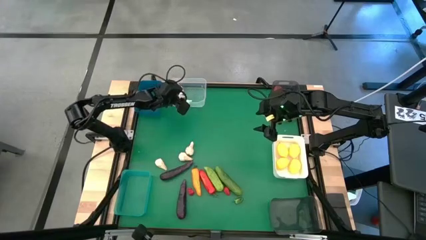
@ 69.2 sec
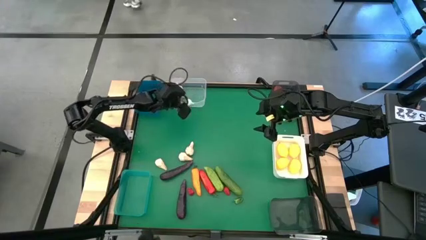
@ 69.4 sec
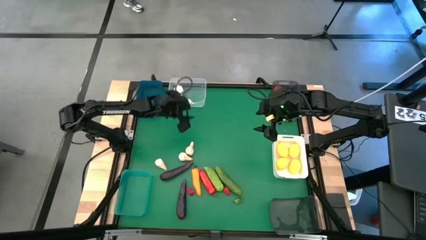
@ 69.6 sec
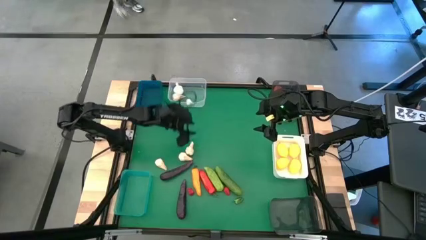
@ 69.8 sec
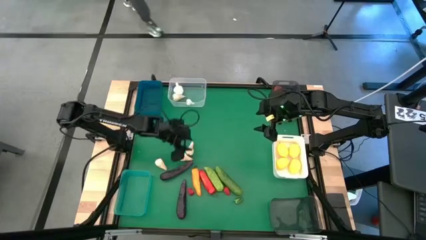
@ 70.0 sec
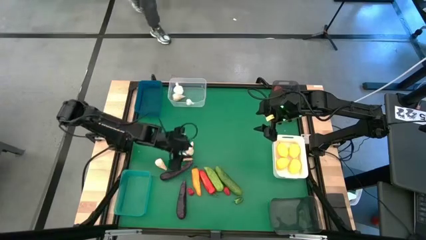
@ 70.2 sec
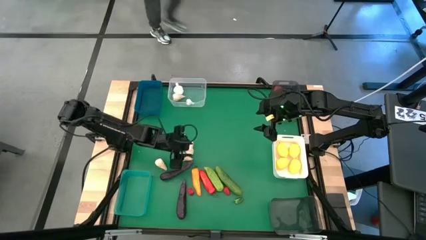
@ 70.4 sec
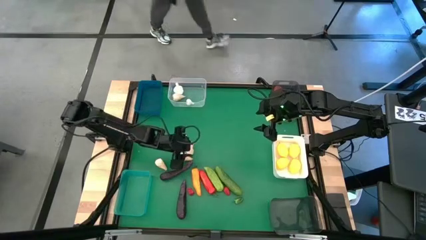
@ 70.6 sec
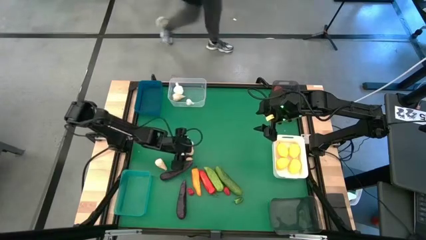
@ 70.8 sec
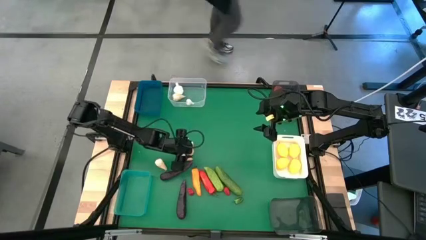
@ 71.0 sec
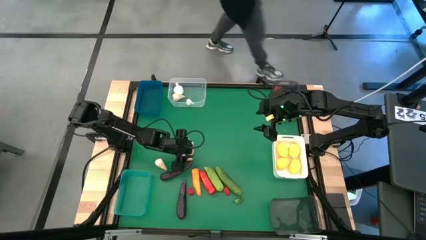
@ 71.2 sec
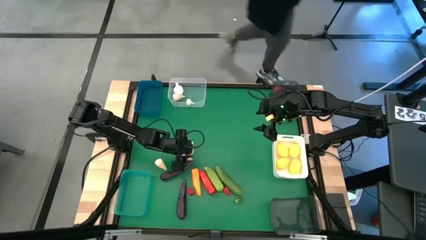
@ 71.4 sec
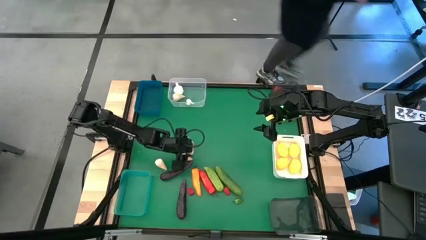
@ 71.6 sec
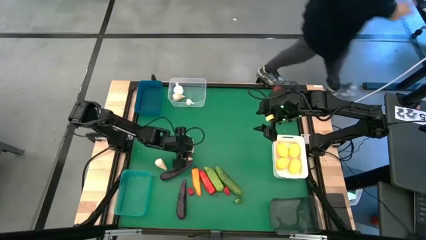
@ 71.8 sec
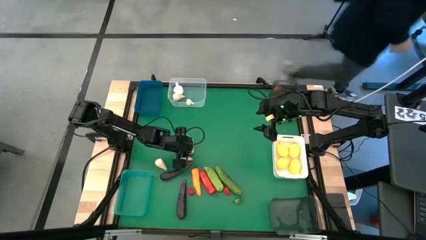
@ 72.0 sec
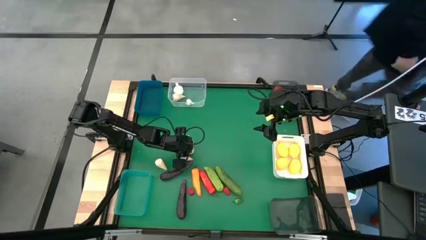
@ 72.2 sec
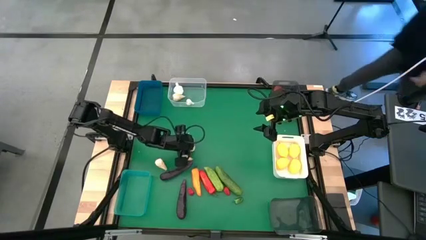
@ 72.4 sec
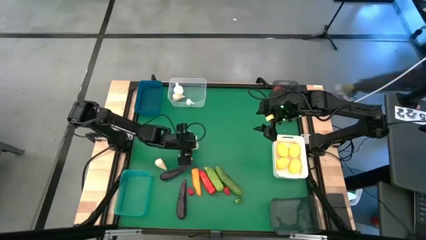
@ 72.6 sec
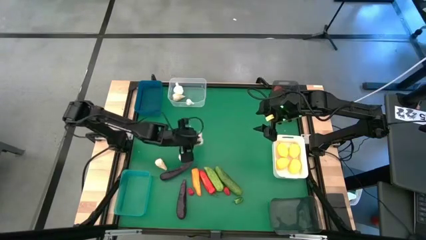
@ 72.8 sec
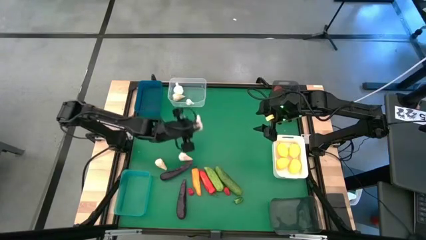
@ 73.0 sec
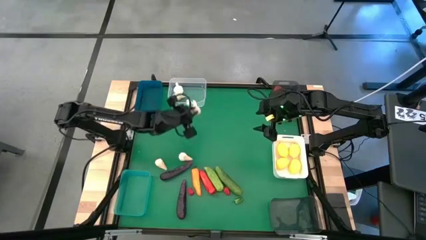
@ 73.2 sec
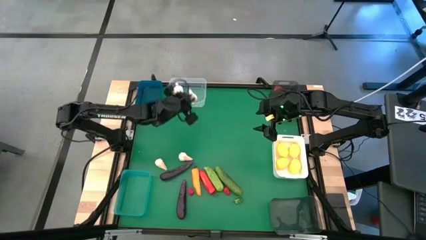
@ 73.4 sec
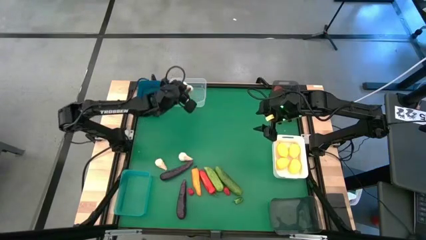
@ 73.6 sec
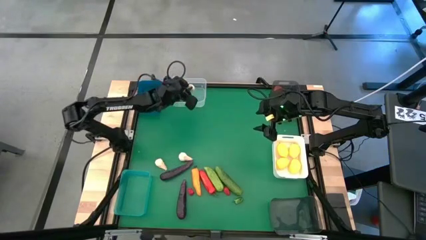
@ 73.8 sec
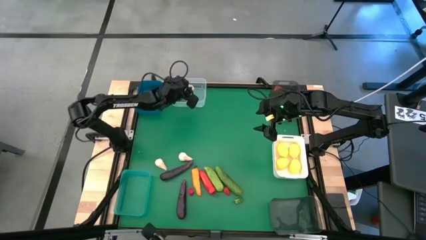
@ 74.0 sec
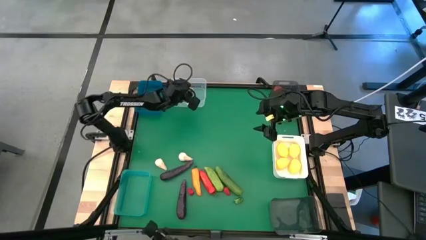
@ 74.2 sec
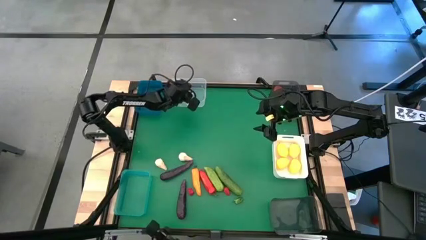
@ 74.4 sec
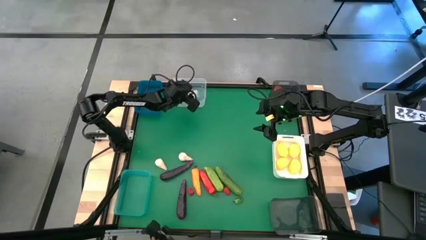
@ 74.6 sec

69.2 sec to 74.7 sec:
Task: Sort produce into baskets
Put the white garlic into the transparent bin

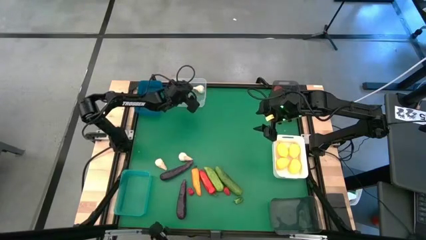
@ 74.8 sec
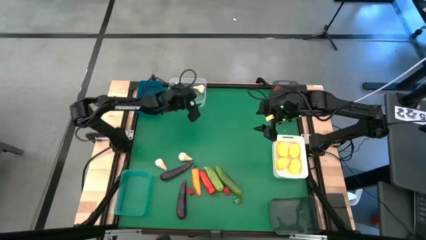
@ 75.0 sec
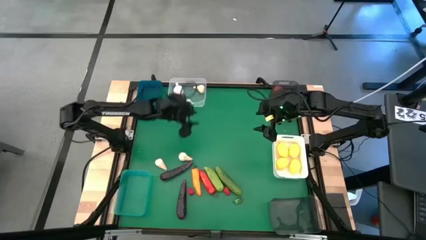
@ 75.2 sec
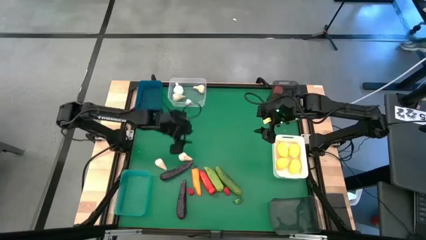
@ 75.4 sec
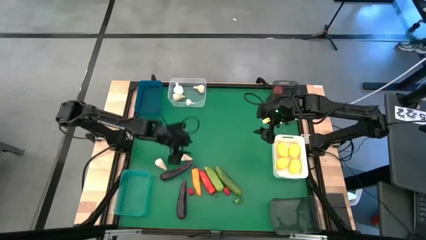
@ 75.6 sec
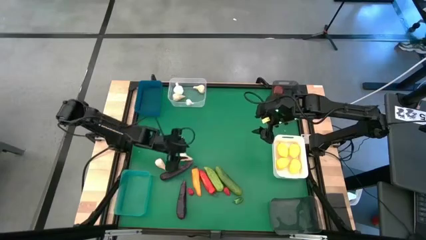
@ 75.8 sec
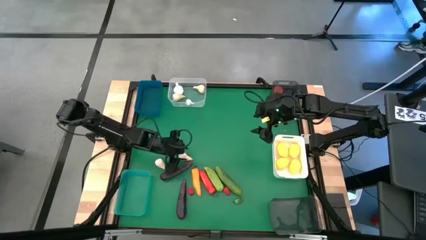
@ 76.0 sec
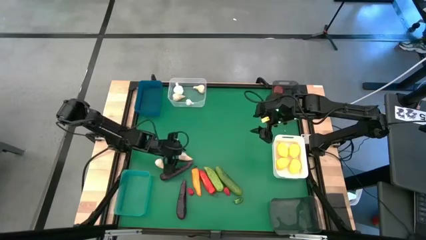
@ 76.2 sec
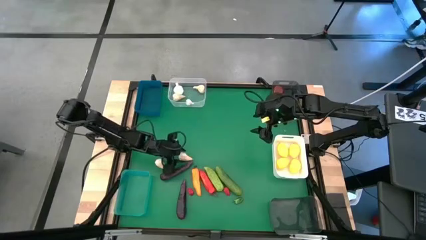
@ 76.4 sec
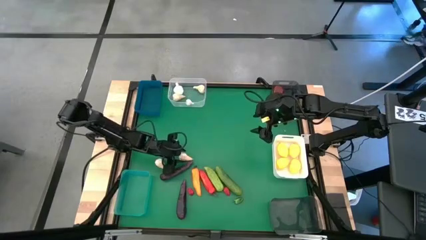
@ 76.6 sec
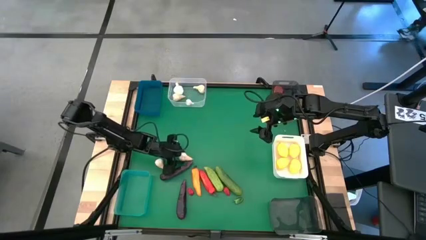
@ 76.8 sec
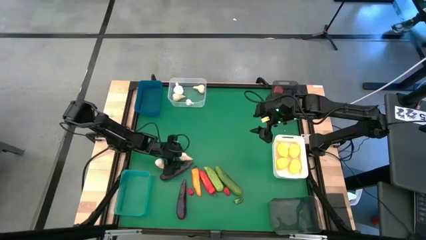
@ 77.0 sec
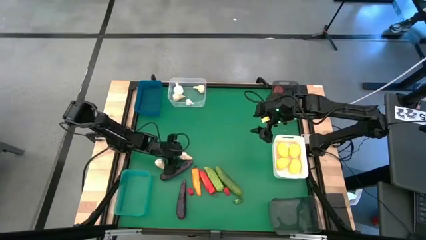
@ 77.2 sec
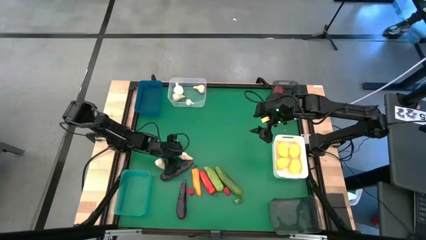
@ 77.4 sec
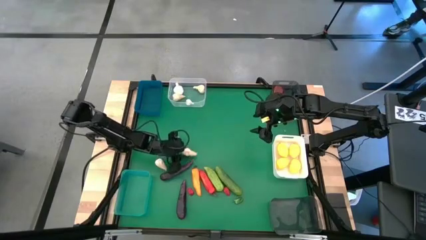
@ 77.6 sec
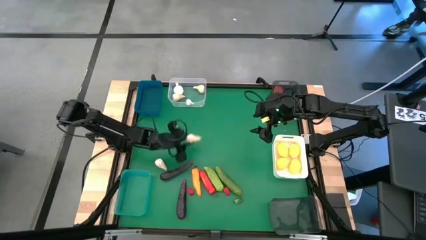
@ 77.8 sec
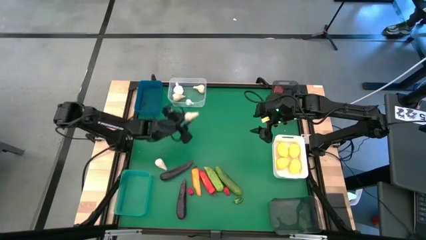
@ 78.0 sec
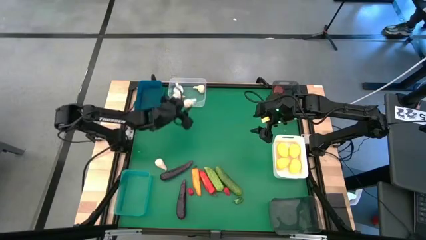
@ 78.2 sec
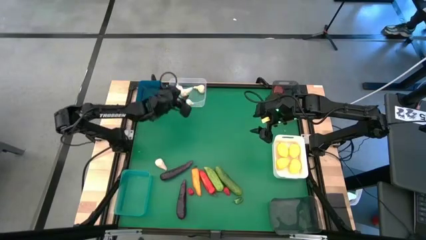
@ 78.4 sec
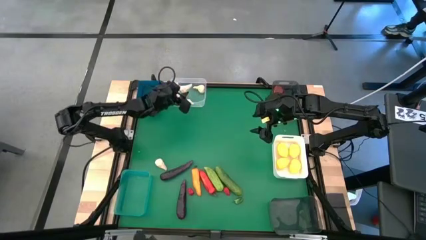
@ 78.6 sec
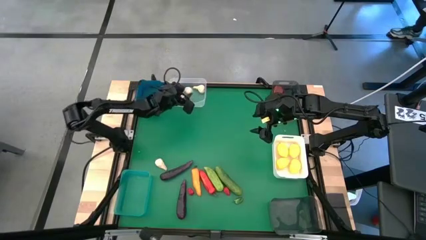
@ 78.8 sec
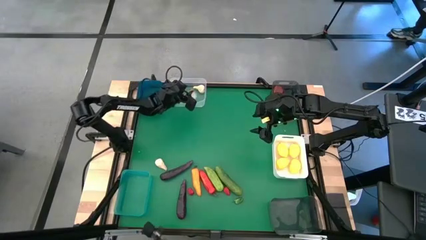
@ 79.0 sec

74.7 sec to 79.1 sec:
Put the white garlic into the transparent bin

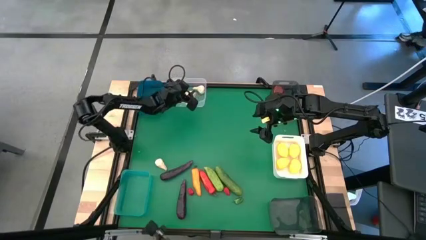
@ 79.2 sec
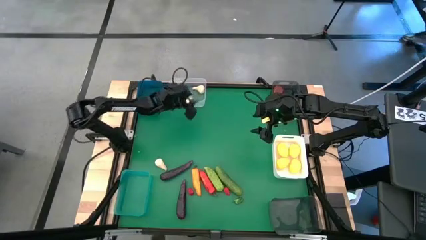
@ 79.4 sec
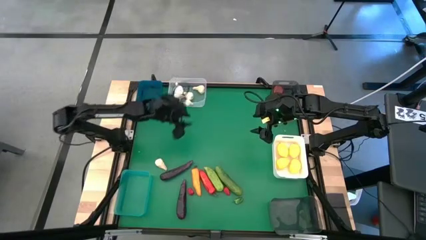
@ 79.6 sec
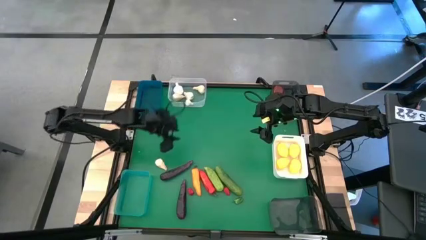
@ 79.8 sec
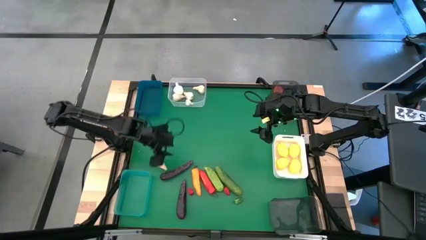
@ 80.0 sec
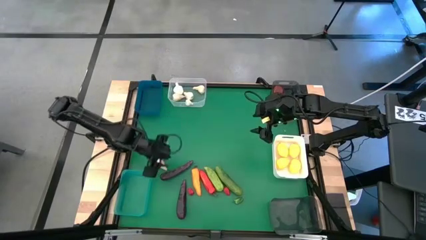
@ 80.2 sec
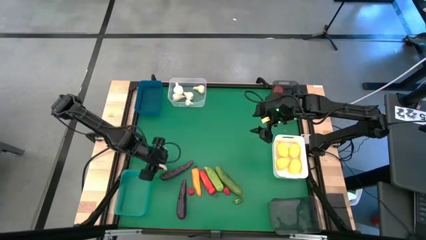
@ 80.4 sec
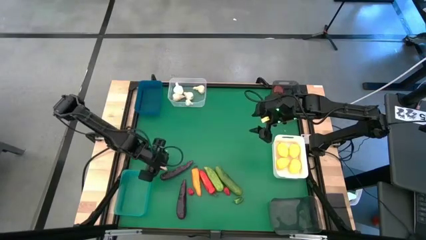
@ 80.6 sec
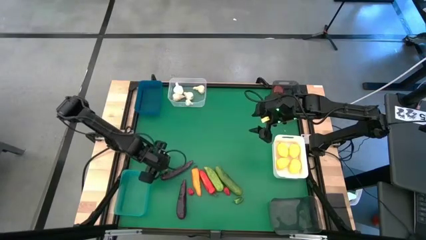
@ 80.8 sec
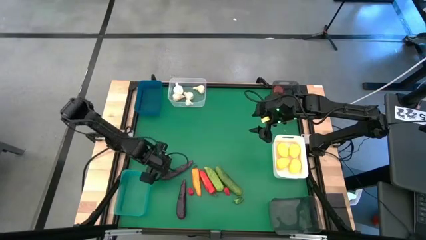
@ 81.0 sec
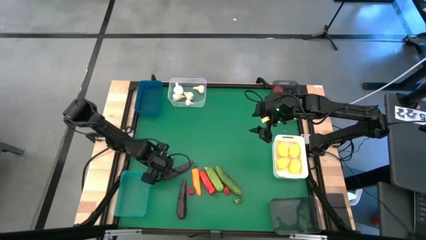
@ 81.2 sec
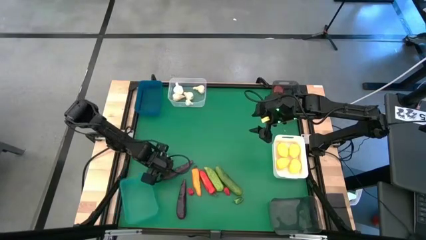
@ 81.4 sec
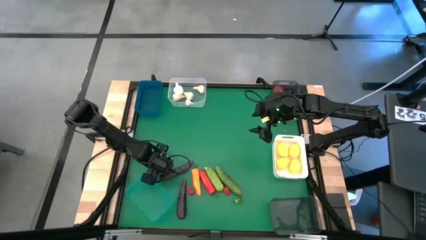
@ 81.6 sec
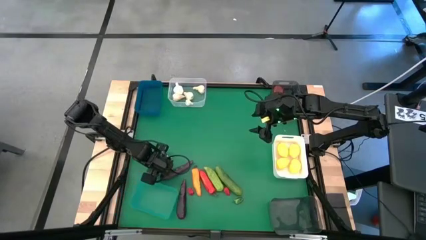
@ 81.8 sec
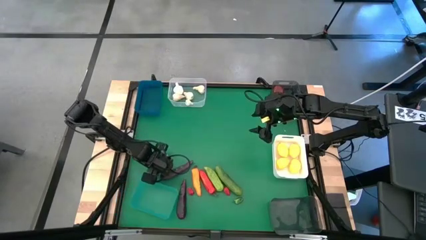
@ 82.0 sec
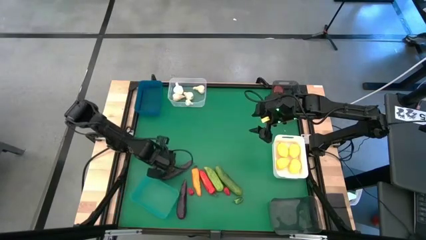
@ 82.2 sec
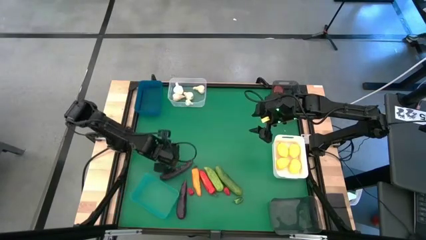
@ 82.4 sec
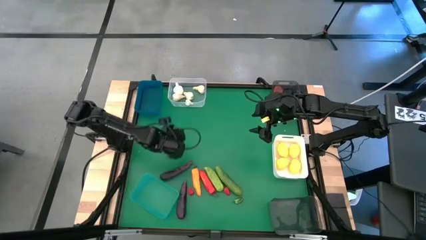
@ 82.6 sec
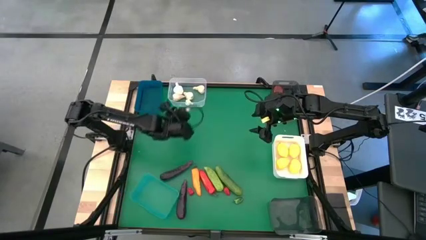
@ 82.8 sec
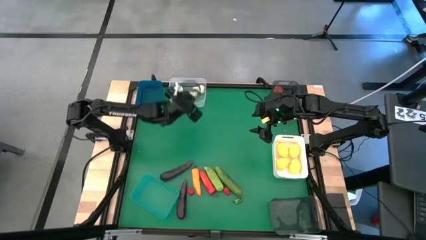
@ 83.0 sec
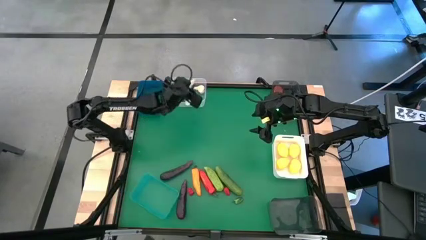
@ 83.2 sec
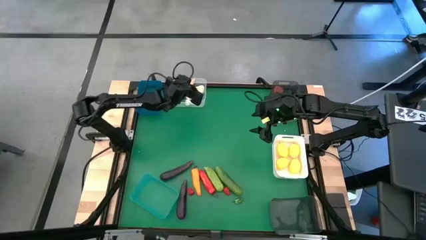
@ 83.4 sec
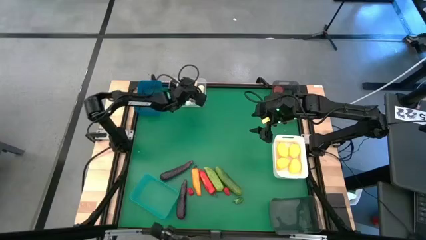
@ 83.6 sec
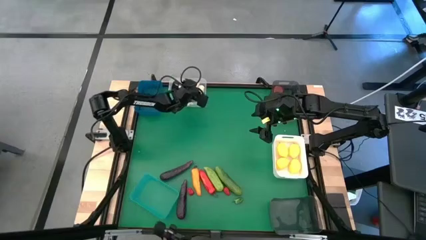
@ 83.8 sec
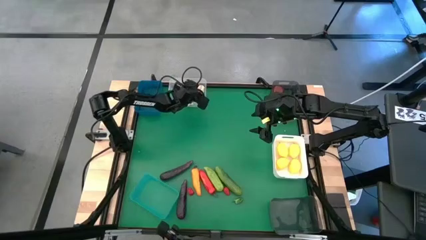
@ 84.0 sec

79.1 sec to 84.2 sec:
Put the white garlic into the transparent bin

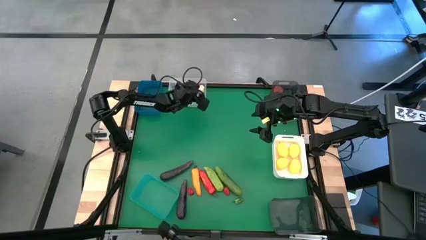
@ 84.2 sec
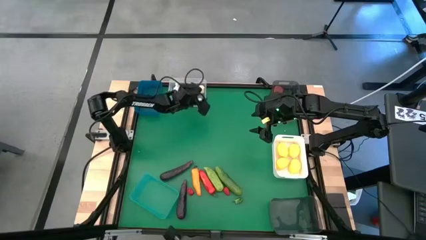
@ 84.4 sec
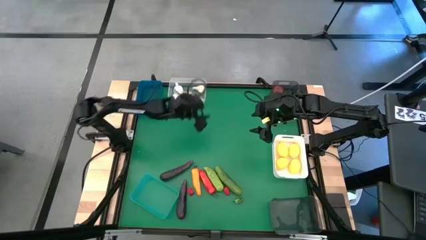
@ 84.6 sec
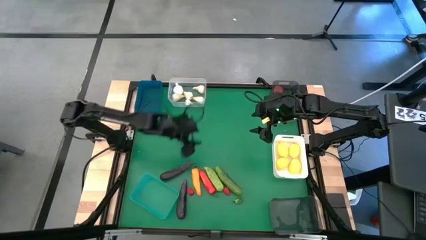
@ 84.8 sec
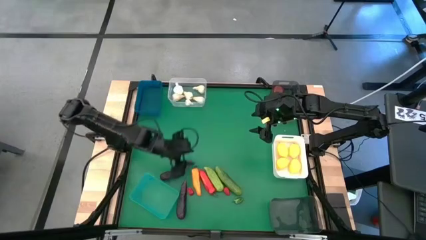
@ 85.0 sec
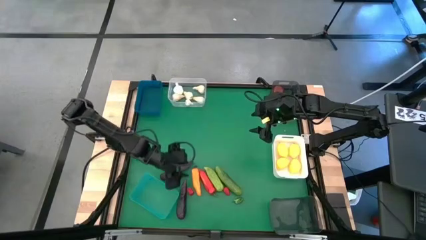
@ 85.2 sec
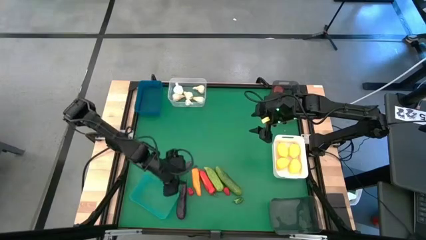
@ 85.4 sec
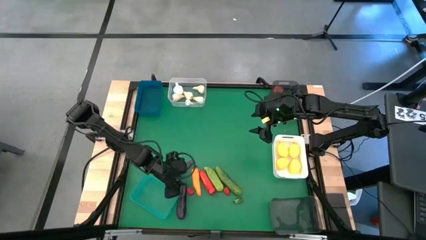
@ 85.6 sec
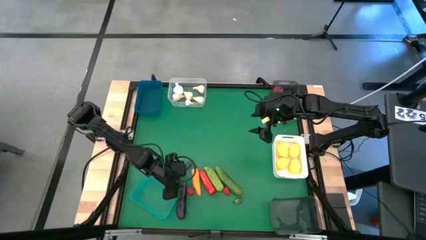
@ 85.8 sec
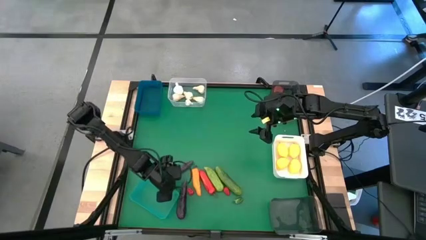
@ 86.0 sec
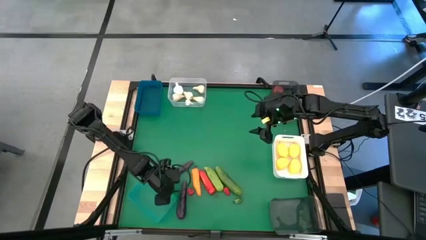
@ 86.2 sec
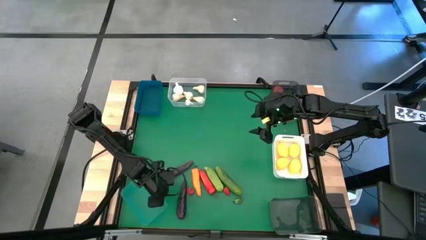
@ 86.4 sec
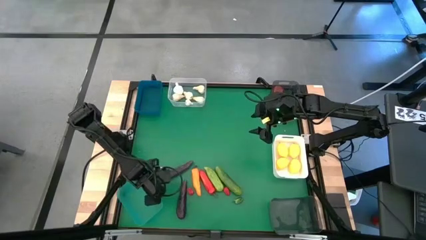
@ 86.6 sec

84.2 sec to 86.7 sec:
Adjust the light green bin on the bottom left of the table
